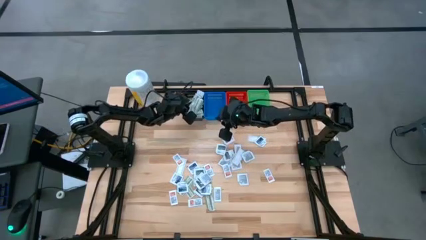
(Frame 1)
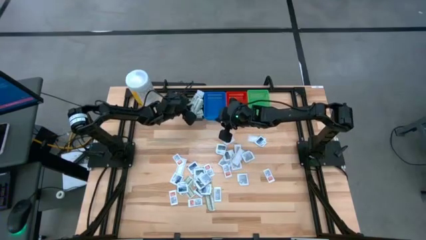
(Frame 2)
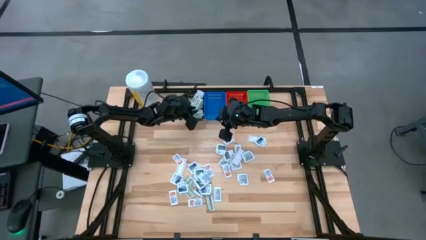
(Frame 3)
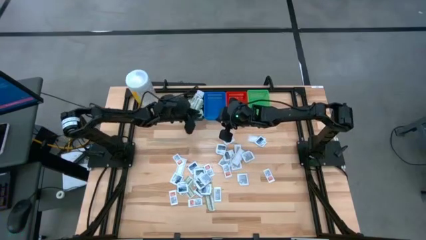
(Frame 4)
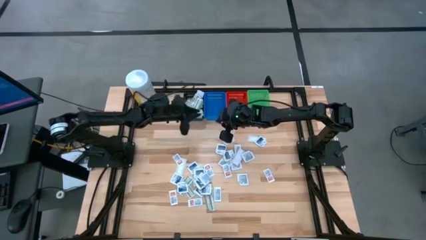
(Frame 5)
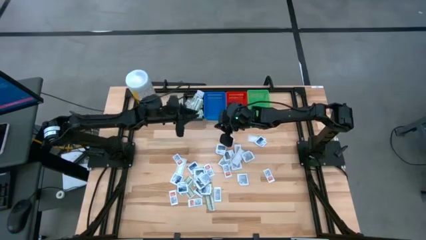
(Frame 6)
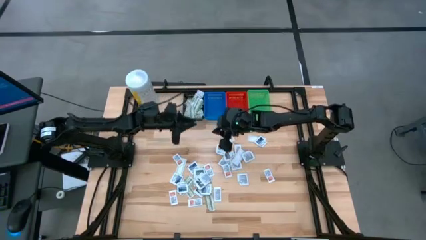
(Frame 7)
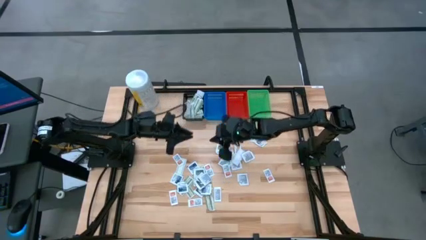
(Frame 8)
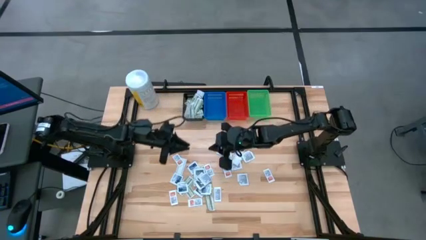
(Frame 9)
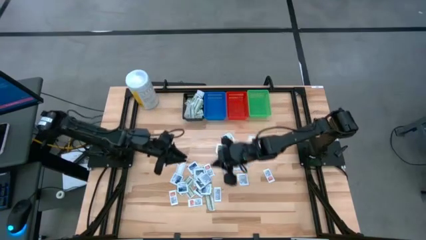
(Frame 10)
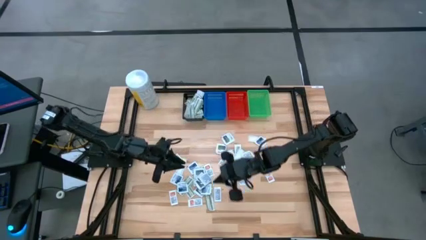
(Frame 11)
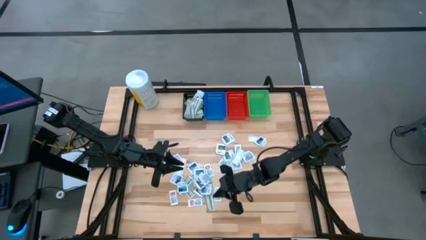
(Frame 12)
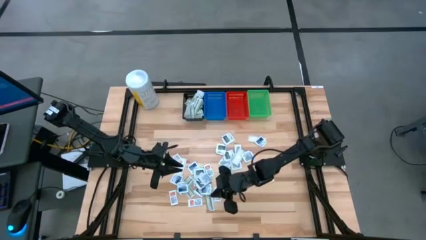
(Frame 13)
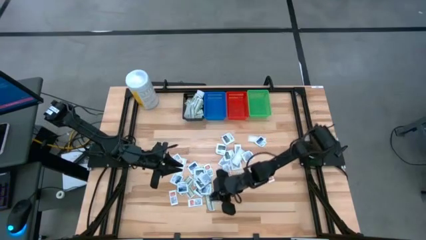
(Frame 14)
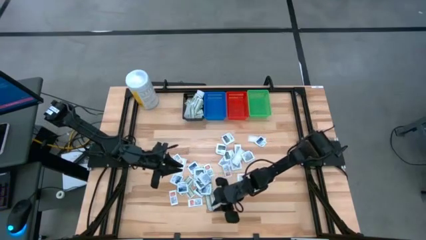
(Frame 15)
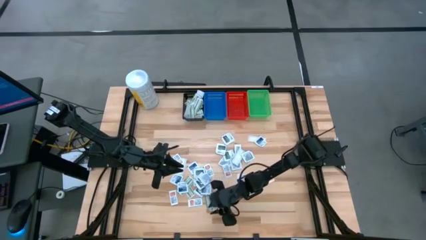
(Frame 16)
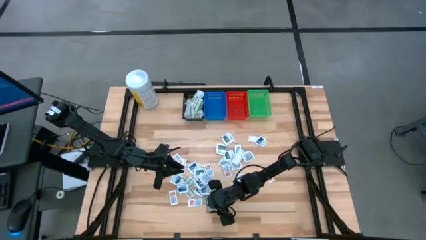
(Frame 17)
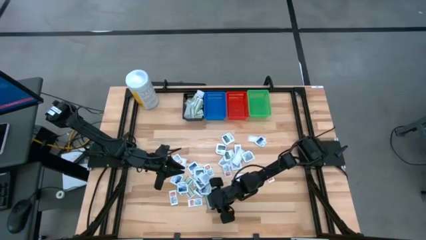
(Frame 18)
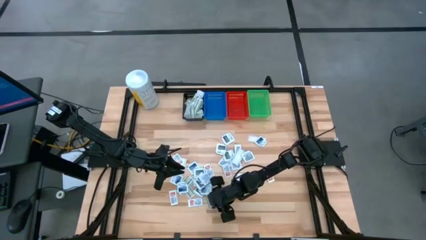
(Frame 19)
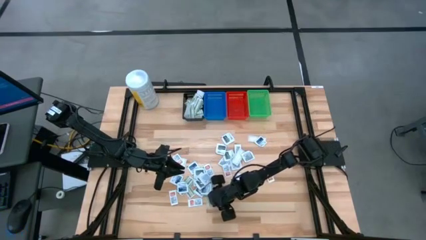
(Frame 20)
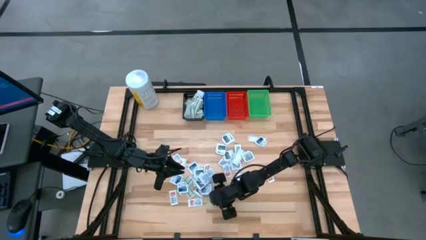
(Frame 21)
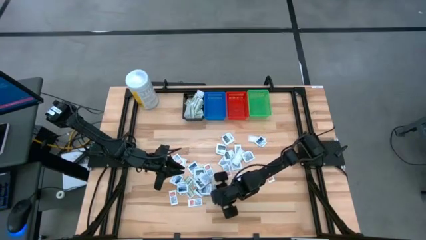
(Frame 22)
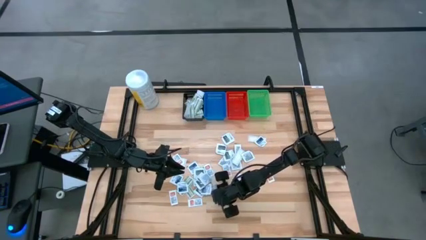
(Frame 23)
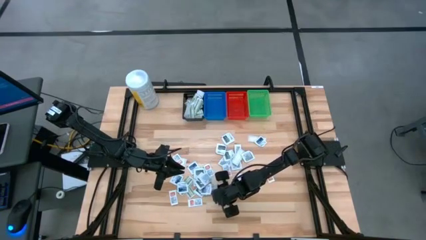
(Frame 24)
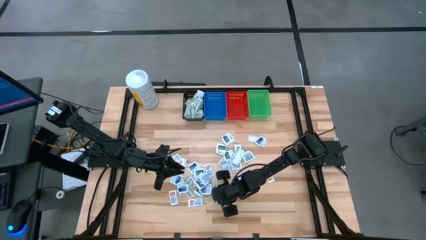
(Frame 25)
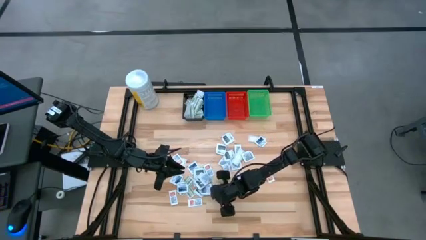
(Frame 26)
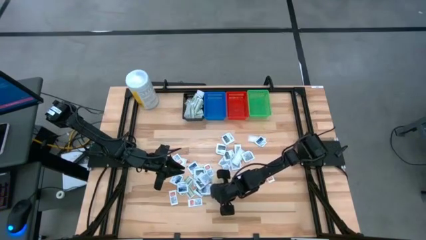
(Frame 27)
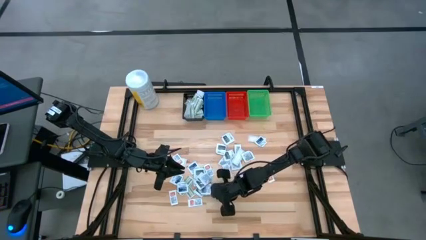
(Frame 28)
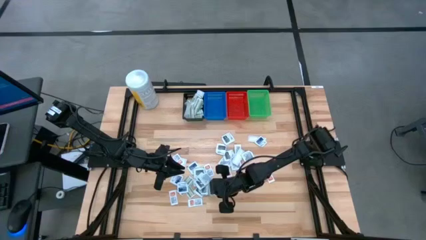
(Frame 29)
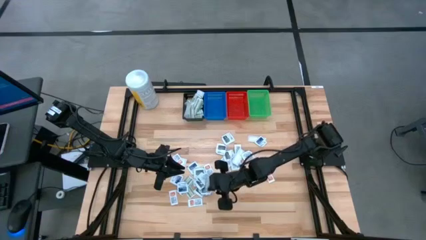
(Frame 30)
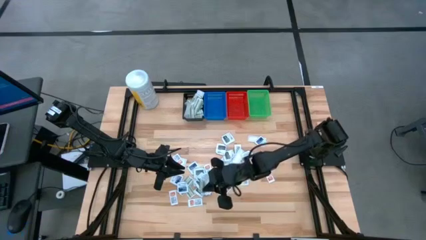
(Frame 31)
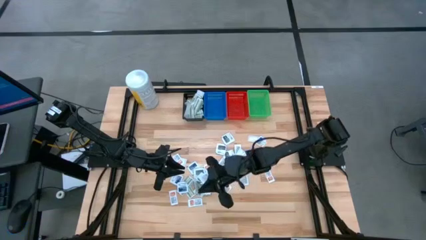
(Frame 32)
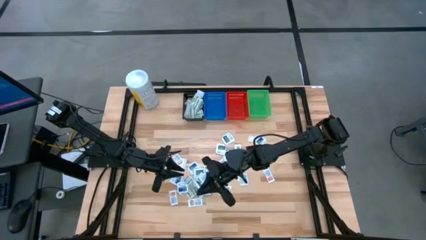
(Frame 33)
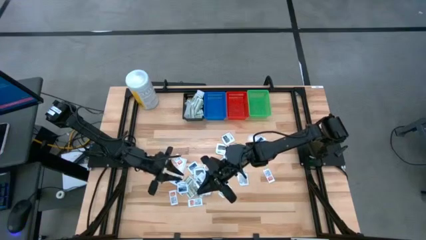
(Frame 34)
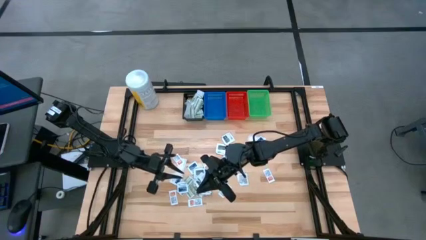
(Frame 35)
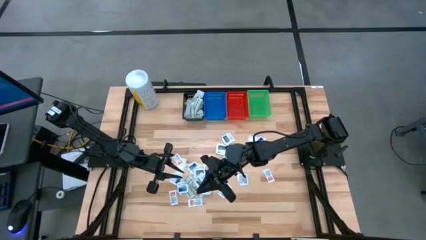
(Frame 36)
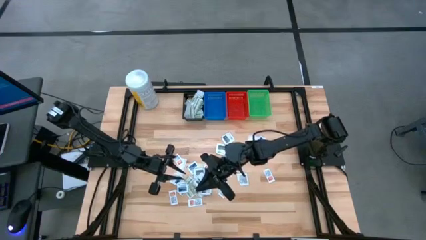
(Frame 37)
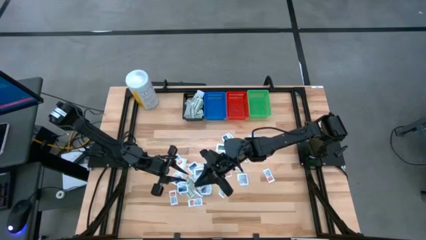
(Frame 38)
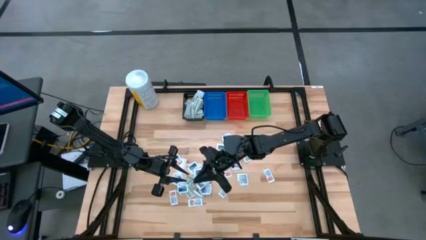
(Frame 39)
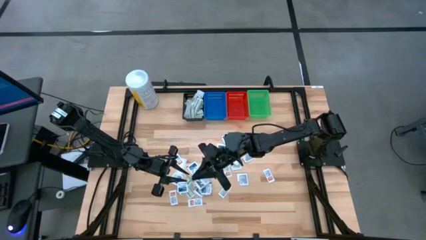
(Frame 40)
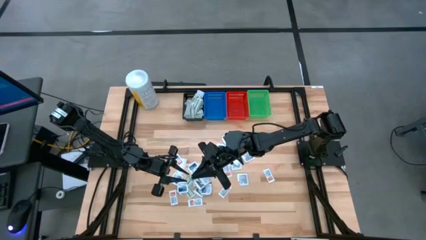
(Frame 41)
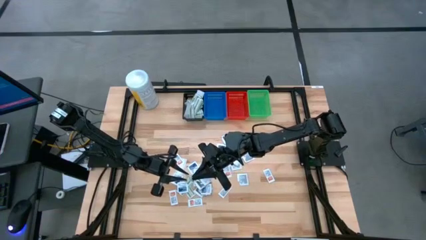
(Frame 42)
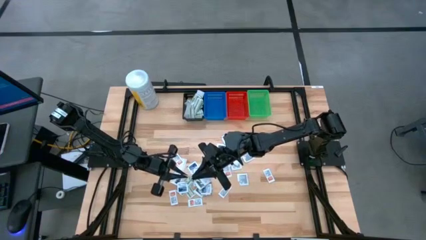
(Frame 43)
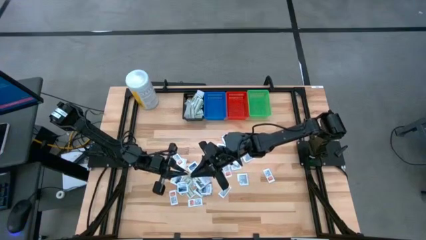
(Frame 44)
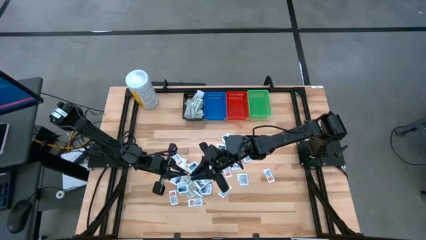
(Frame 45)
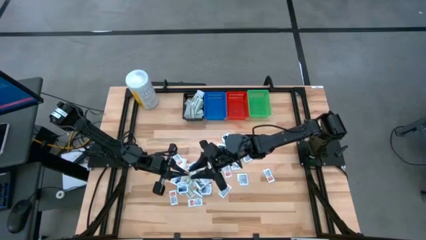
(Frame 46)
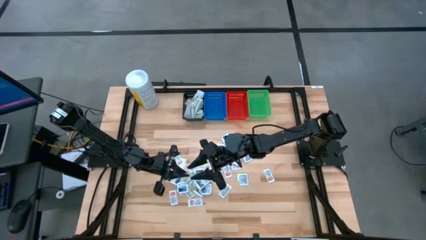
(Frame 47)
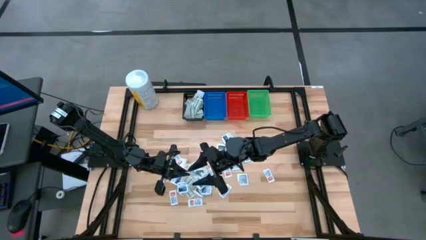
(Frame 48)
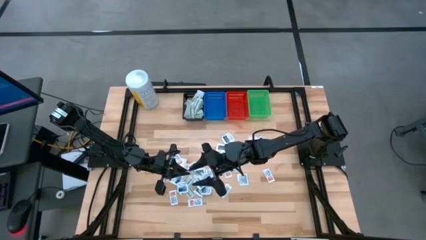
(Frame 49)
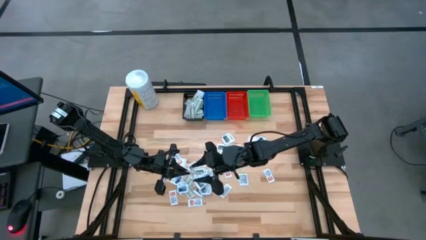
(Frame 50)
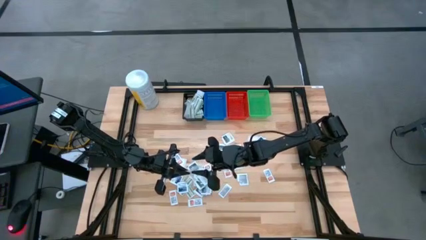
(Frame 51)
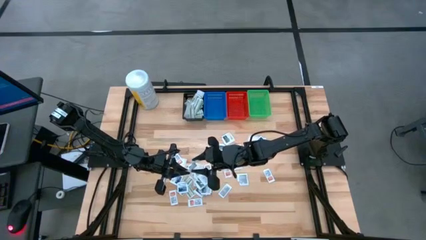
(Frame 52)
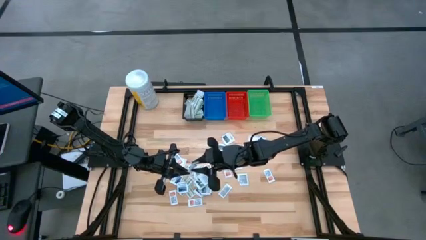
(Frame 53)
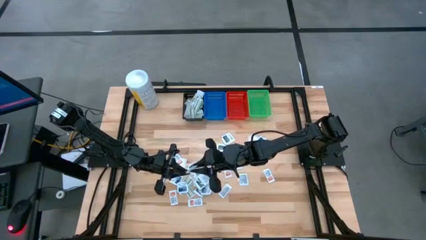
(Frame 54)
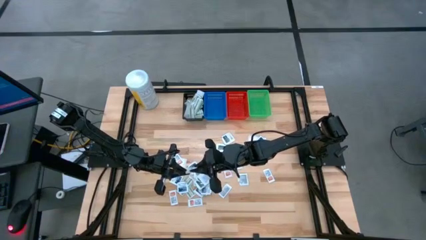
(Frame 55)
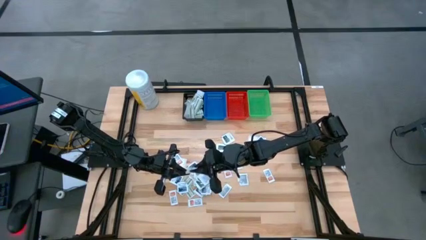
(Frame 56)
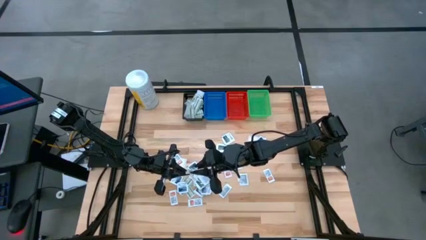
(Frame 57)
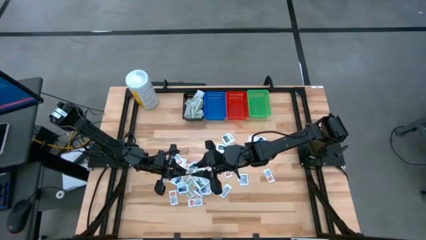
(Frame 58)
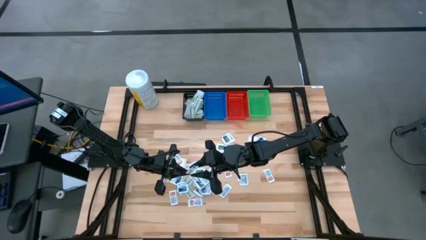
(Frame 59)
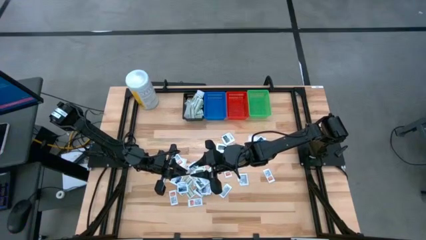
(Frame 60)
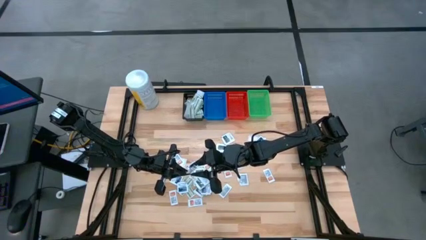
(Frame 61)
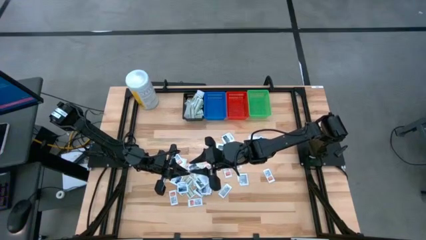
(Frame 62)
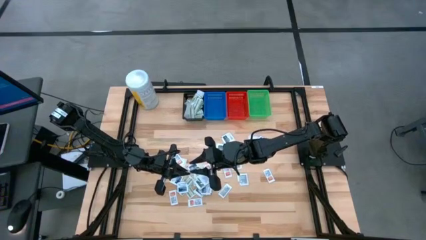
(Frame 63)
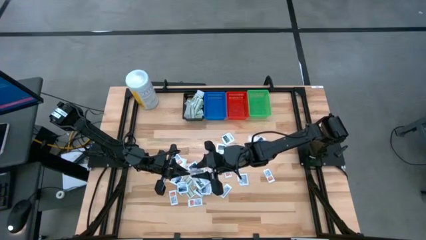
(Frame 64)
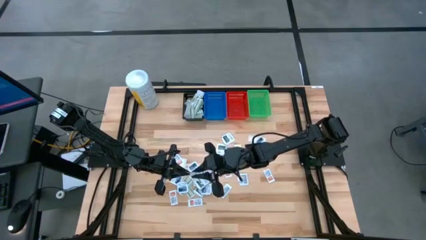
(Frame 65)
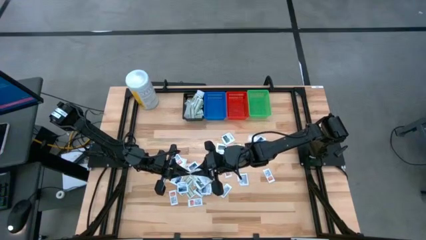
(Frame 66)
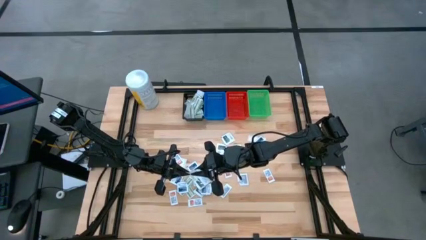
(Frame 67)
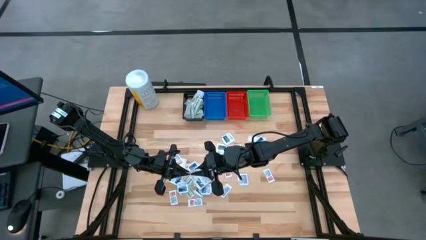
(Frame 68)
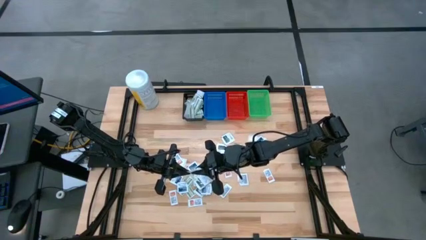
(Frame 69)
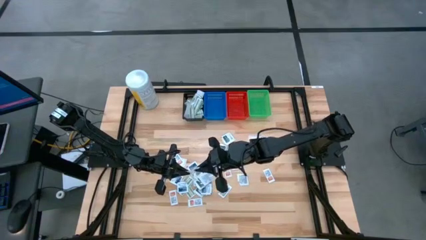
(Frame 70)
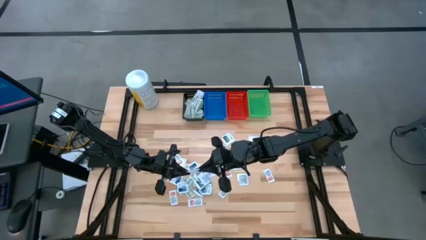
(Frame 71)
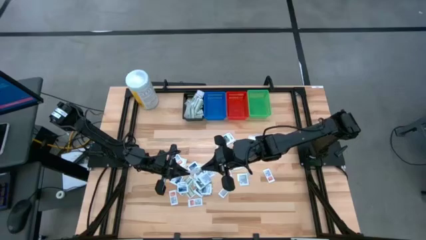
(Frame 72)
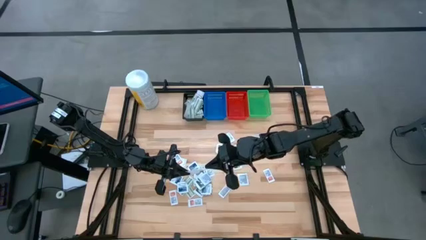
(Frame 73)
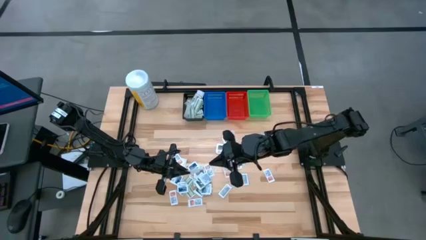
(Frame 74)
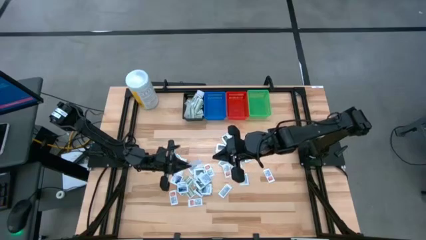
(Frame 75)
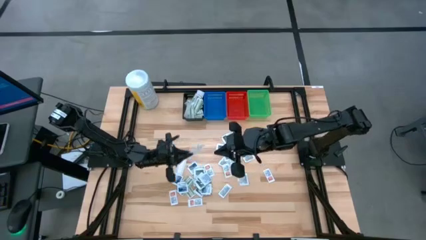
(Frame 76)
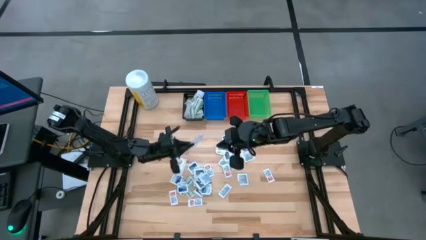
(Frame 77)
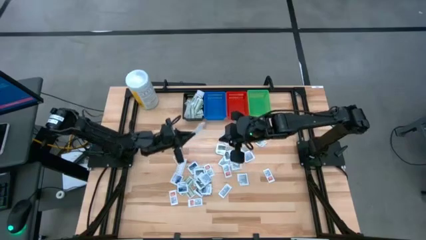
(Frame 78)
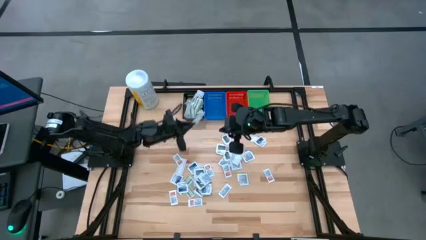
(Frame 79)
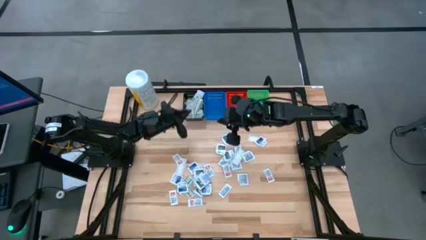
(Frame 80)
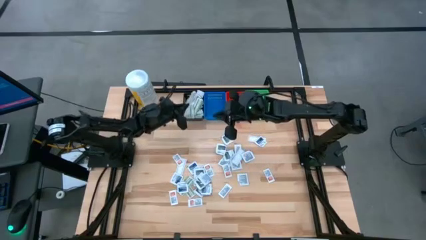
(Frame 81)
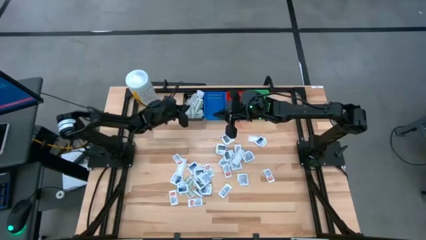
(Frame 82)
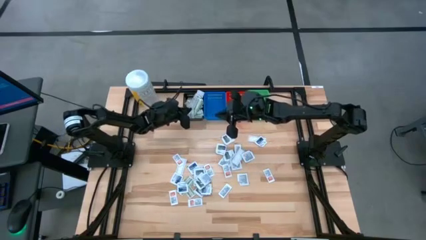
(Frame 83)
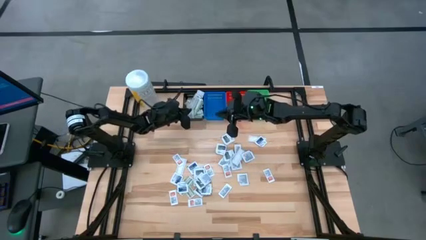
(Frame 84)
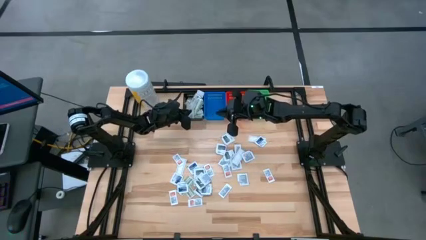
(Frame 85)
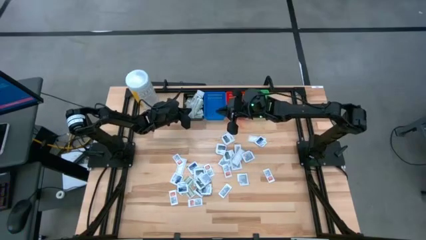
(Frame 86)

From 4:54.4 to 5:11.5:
Task: Pick & Place First Aid Supplies
Put the green bandage pack in the black bin
